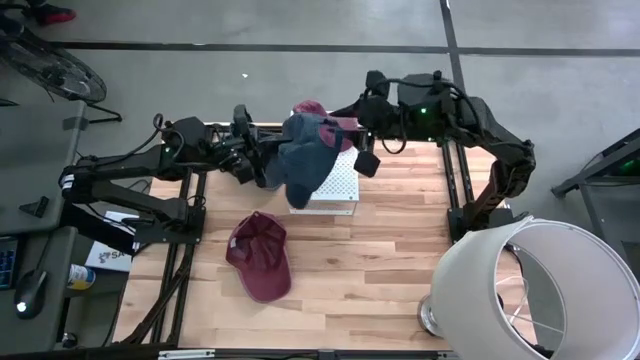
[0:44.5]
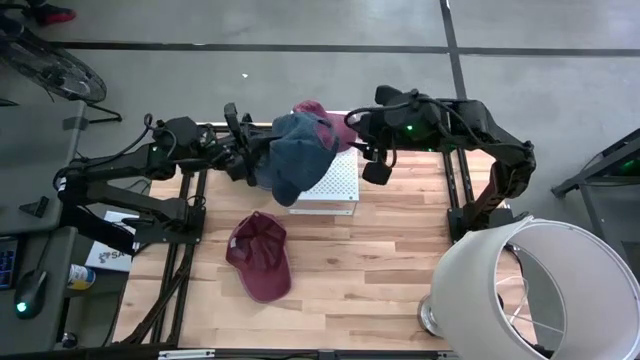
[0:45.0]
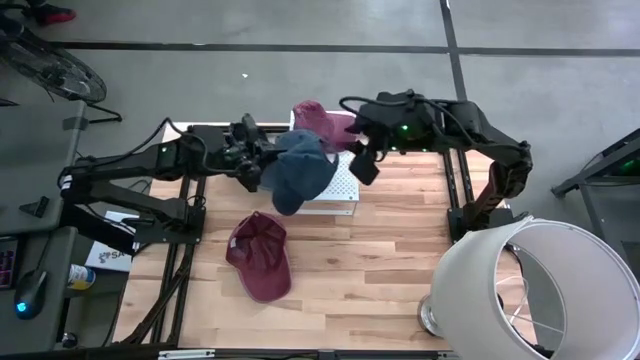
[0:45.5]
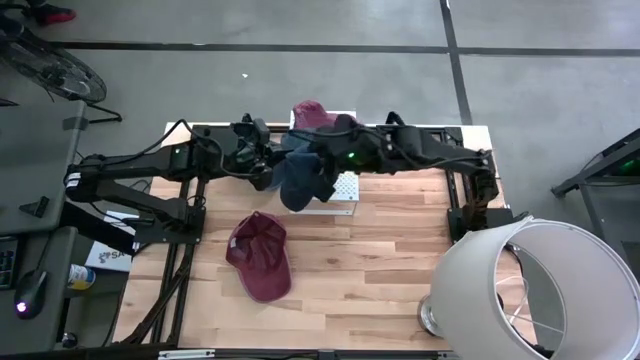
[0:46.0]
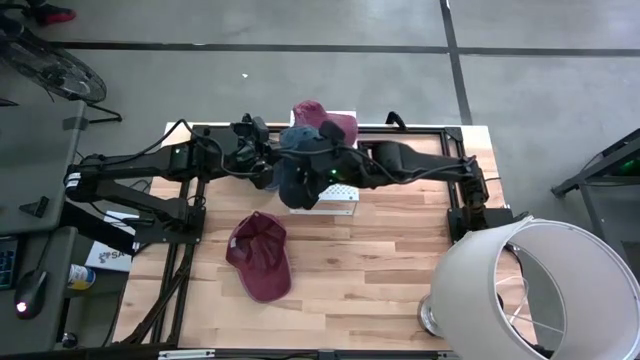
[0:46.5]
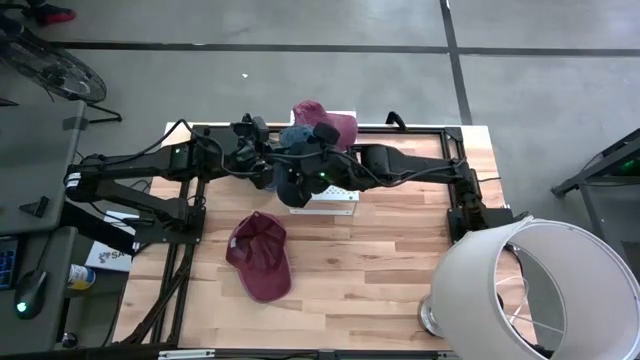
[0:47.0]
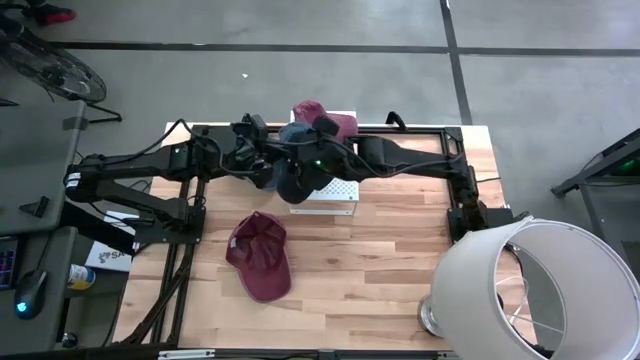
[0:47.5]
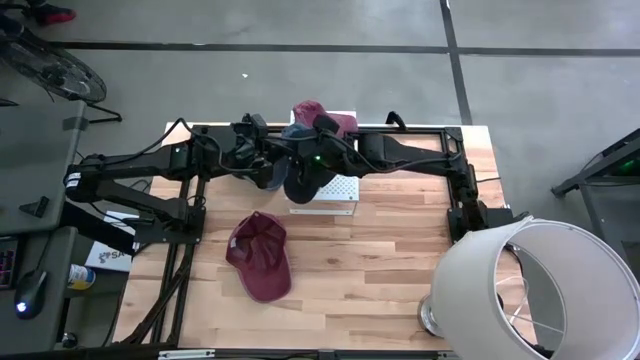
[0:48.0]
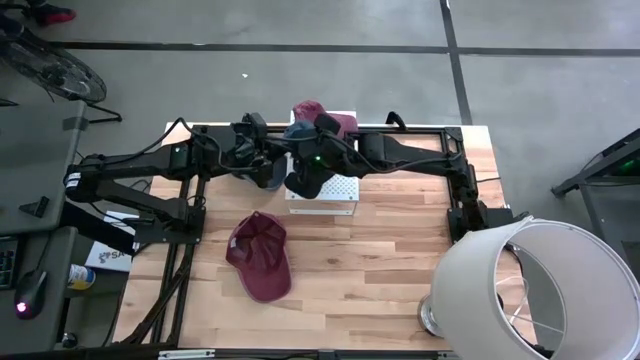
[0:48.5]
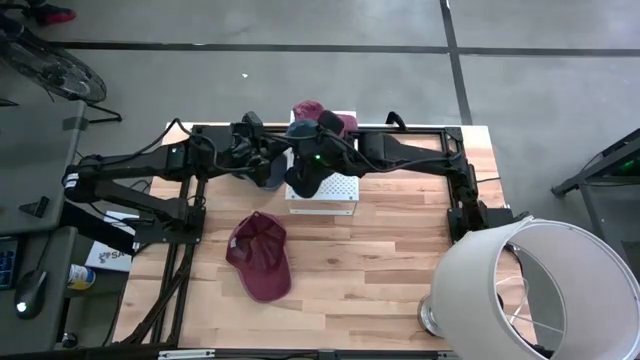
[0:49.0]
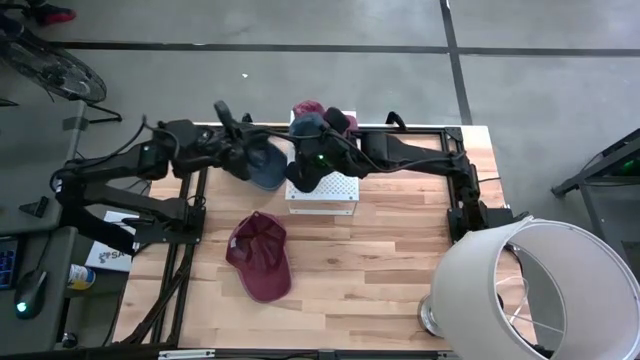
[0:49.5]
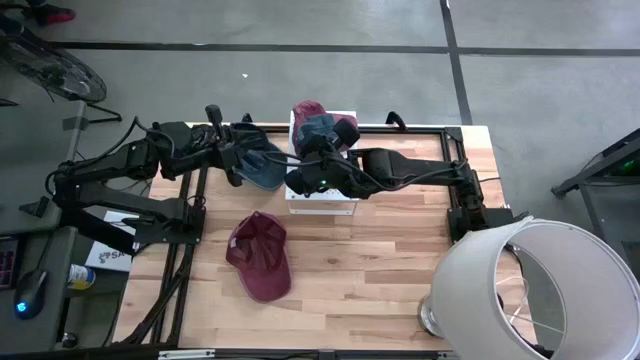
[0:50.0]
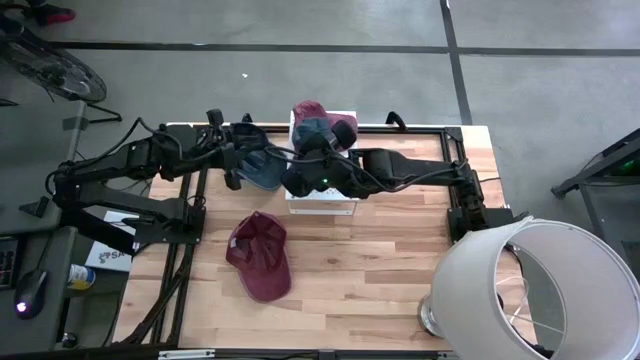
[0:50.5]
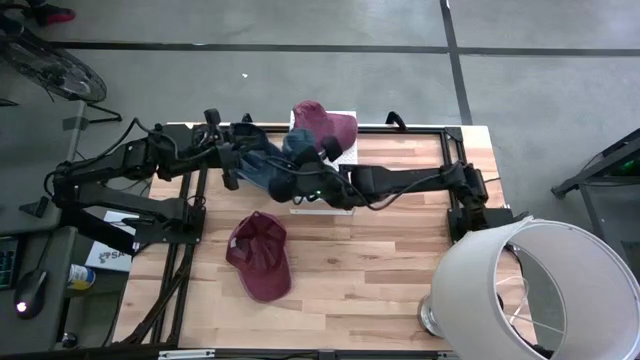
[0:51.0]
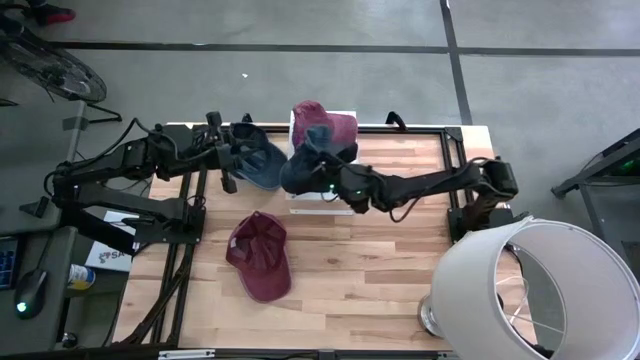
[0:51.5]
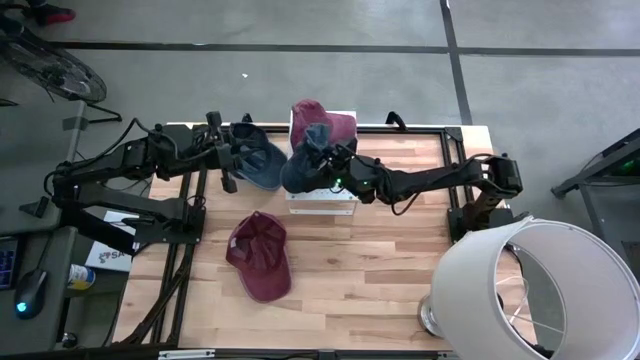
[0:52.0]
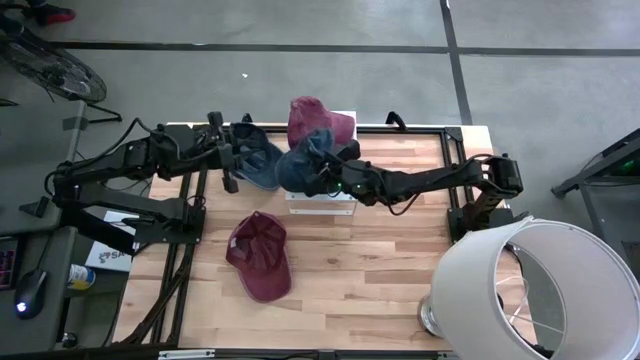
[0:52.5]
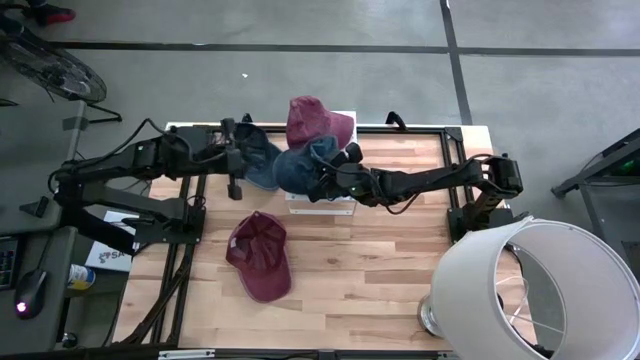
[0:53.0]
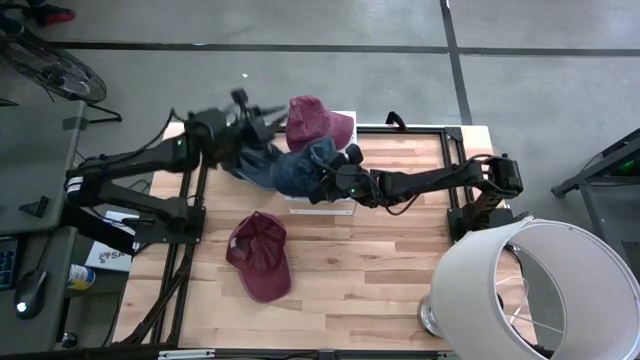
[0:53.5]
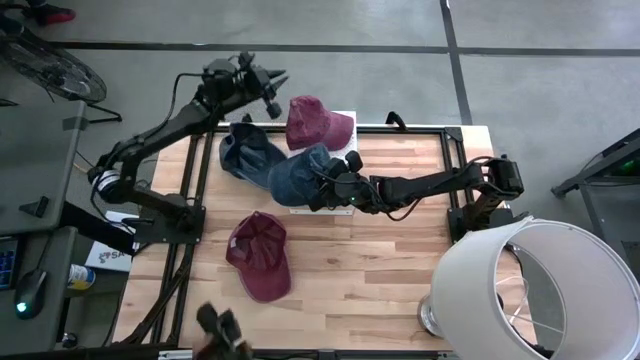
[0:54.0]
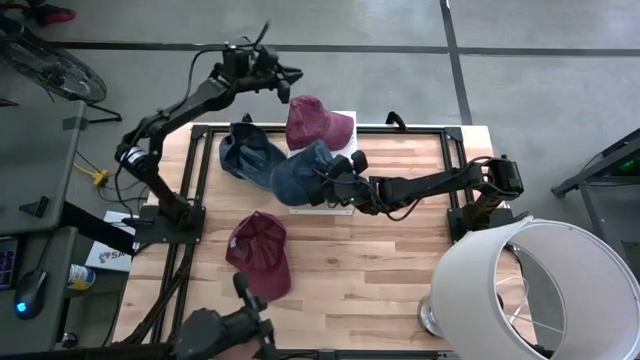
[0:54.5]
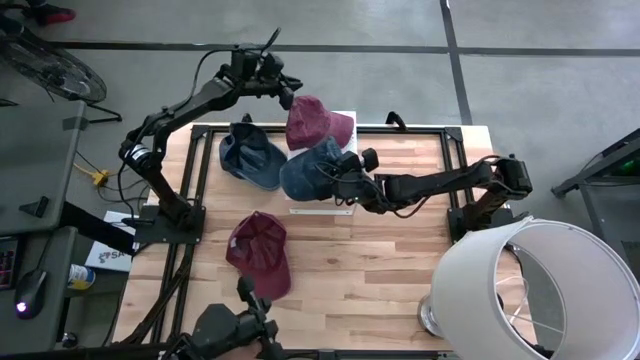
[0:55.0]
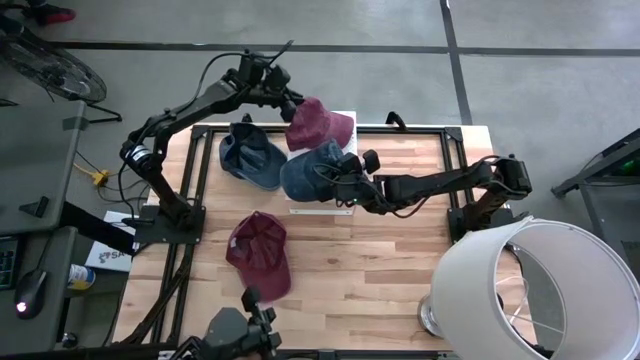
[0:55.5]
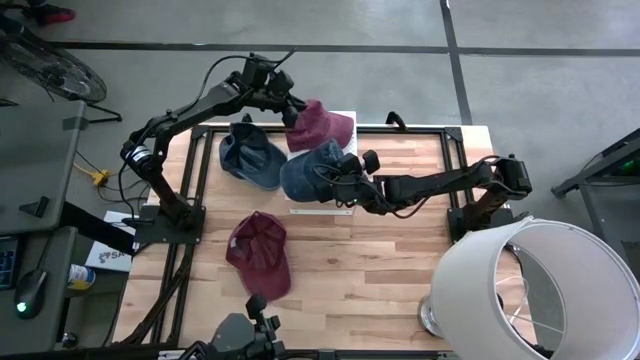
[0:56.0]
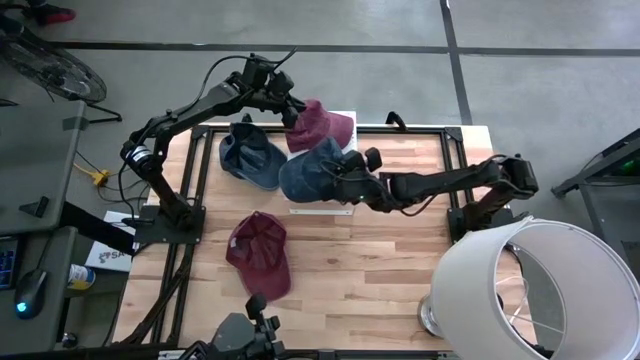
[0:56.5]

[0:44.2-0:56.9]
Task: Pick & Place hat
Put the bottom blue cap on the shelf
